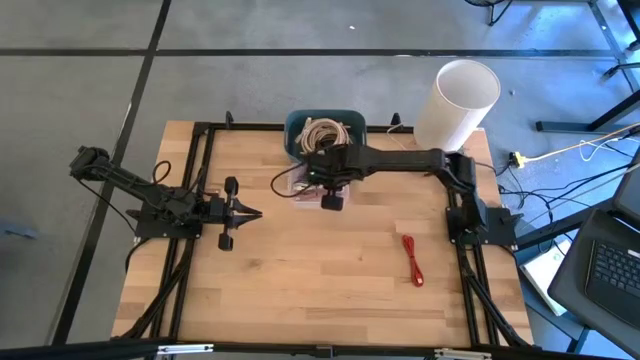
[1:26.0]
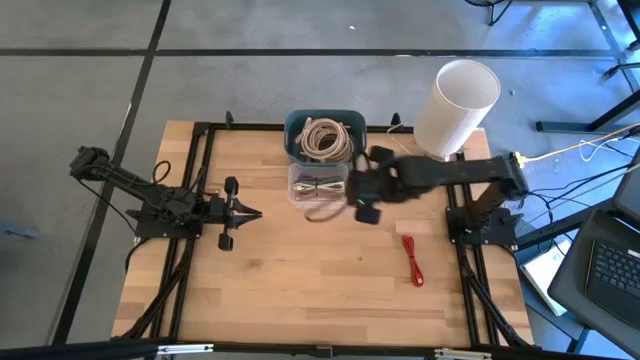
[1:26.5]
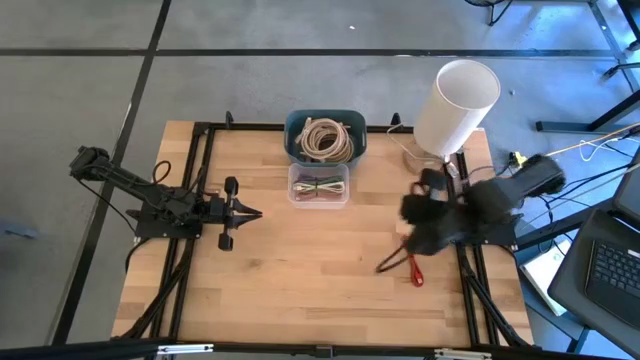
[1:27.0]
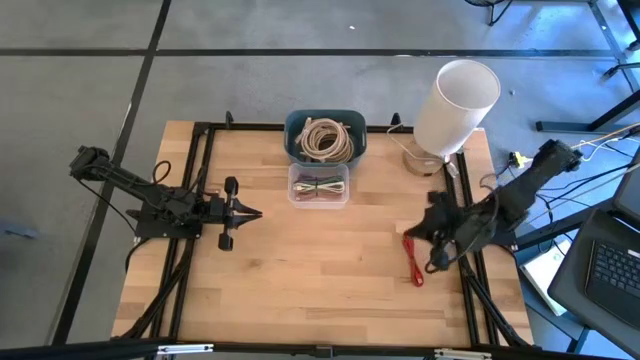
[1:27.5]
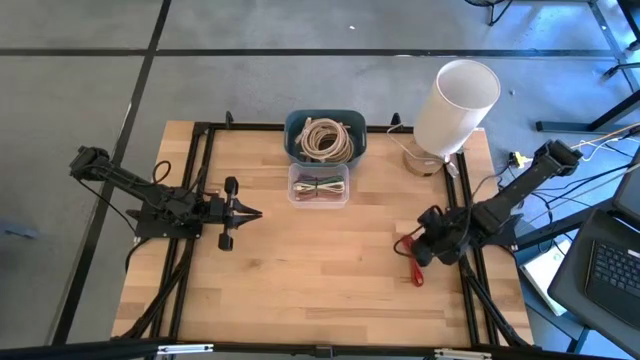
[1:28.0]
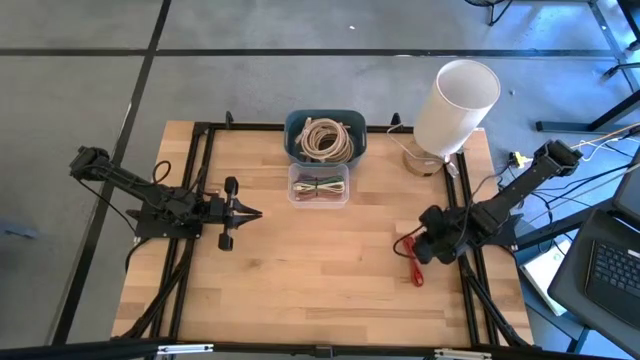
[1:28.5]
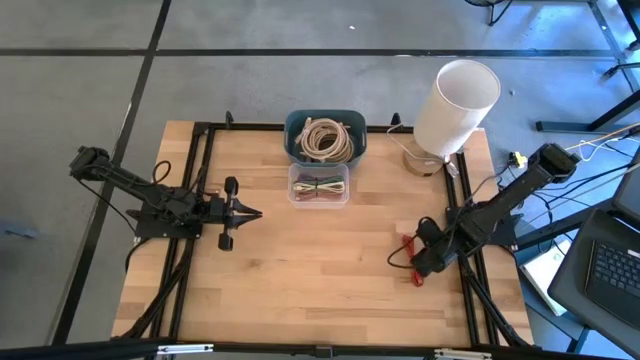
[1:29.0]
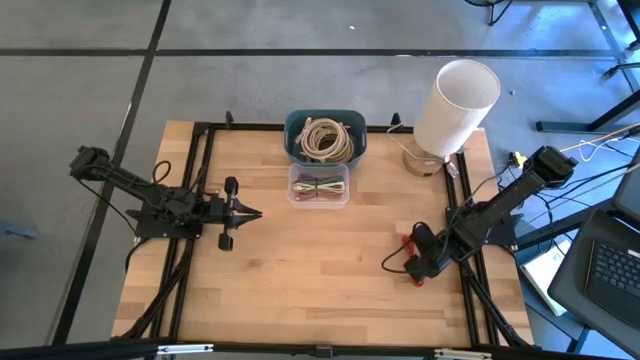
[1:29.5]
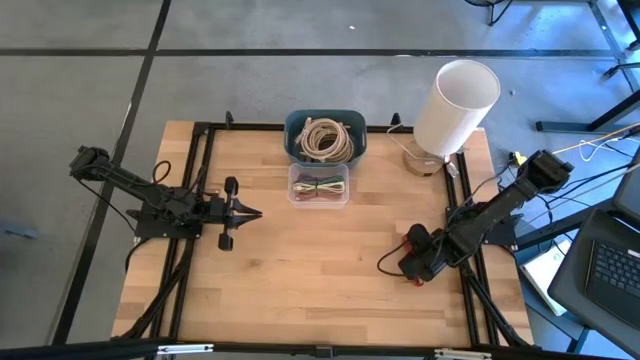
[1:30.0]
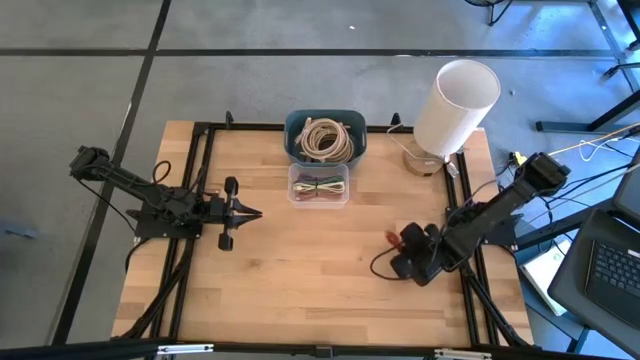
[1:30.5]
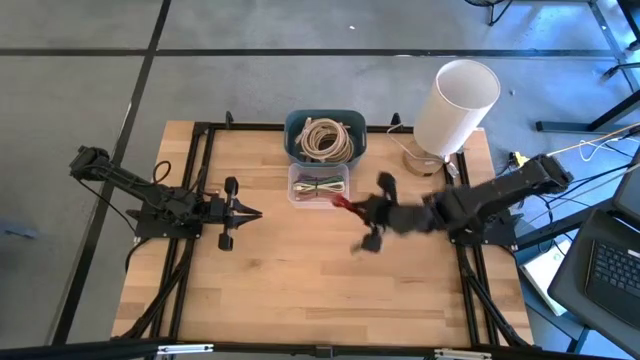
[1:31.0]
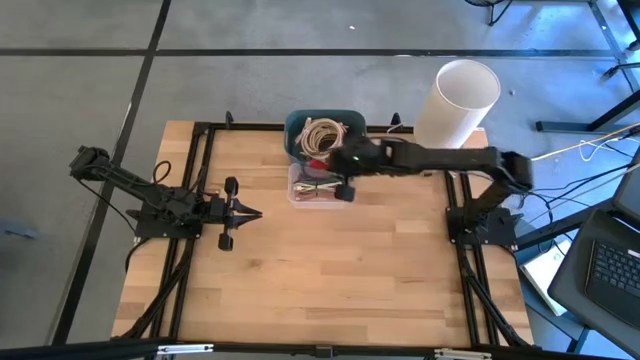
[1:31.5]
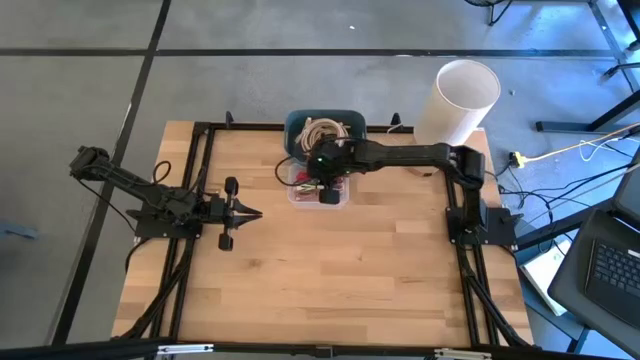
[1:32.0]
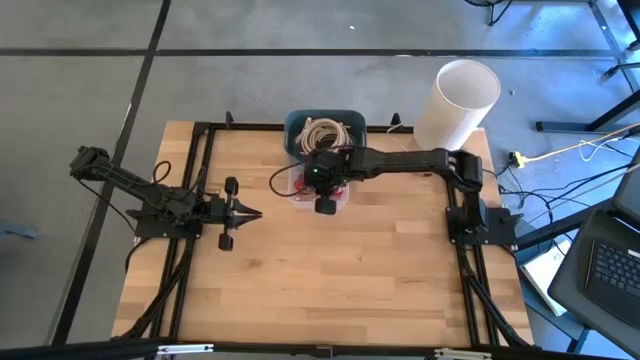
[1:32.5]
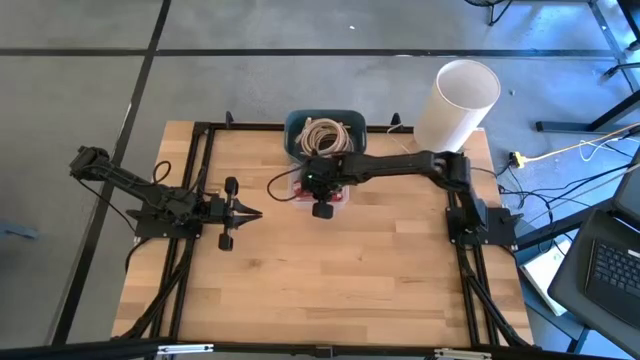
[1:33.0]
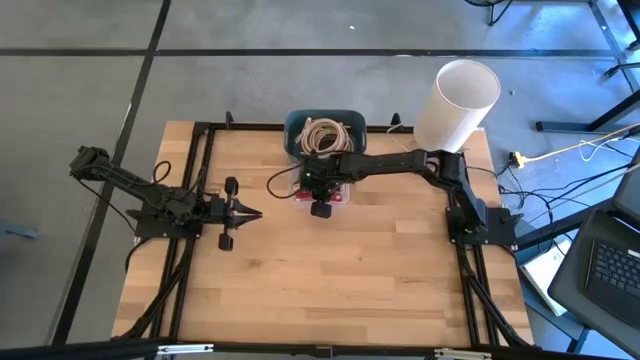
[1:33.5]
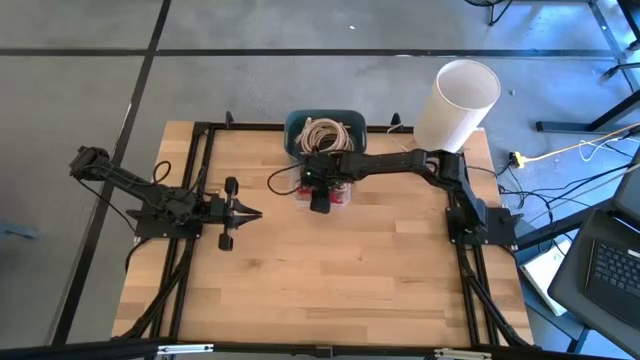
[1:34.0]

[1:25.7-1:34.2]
Put the red charger cable into the transparent bin

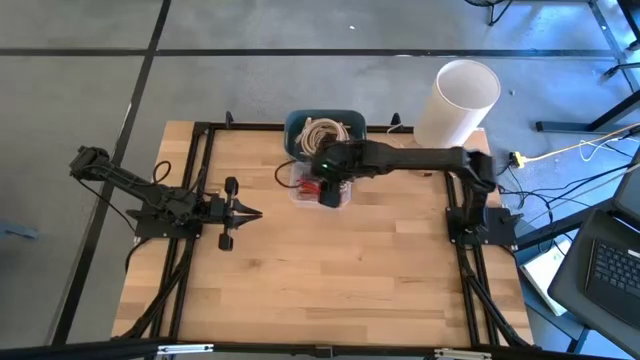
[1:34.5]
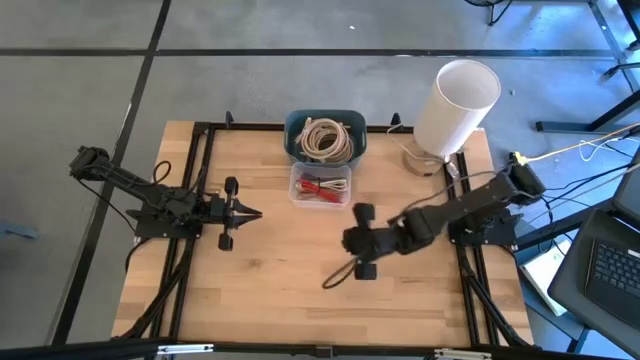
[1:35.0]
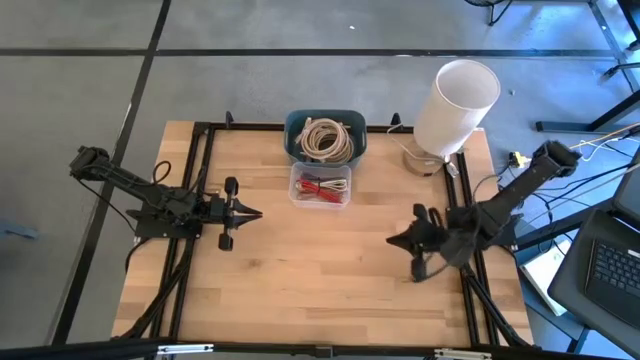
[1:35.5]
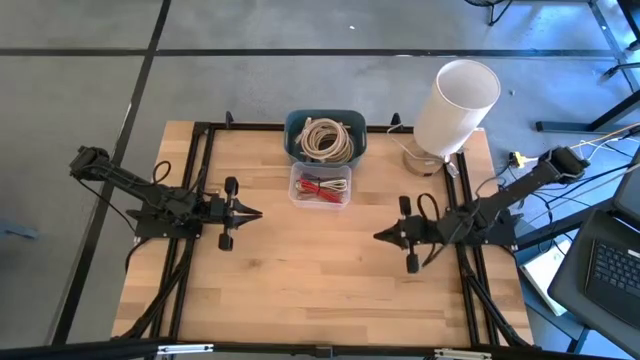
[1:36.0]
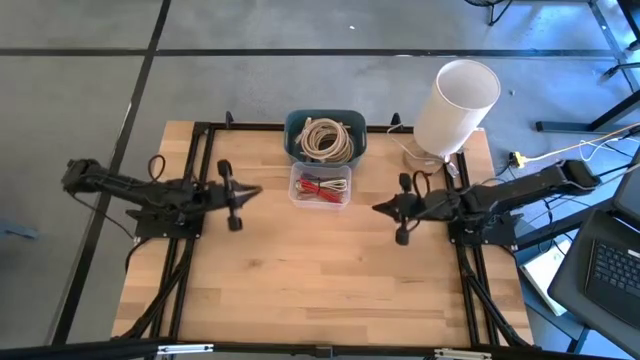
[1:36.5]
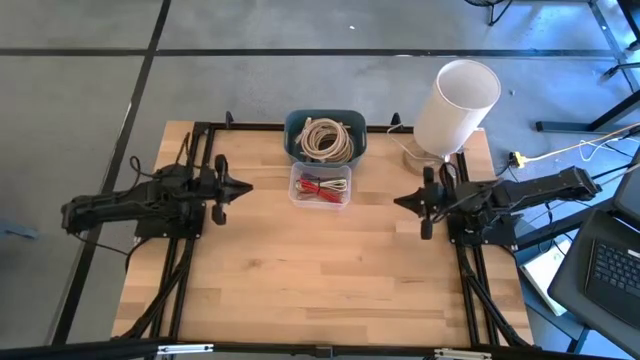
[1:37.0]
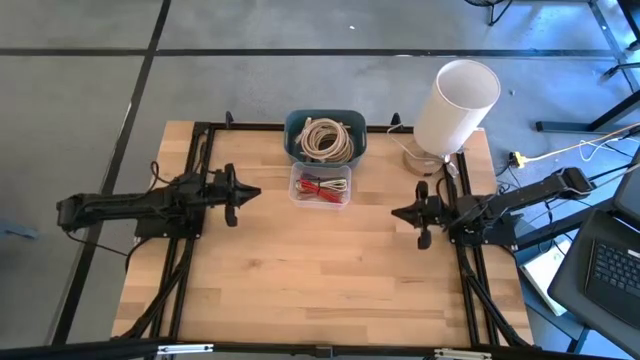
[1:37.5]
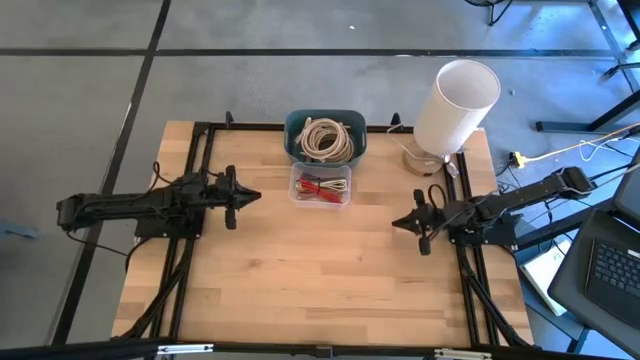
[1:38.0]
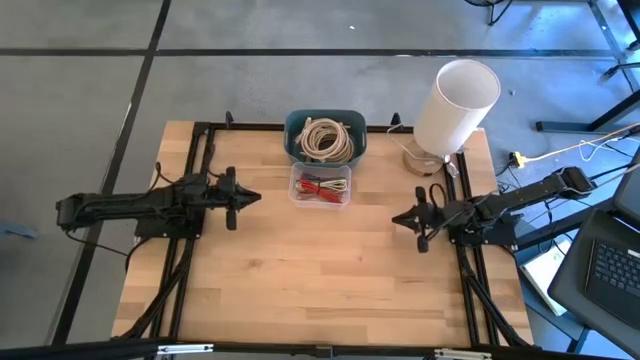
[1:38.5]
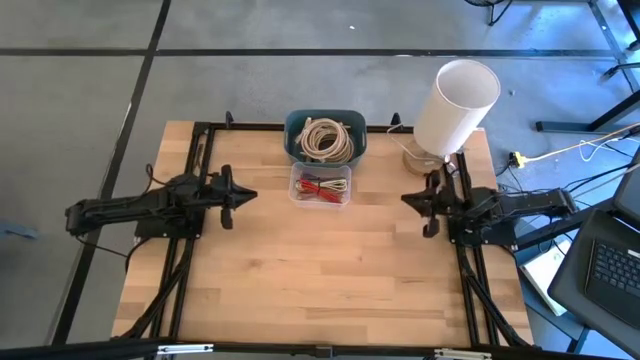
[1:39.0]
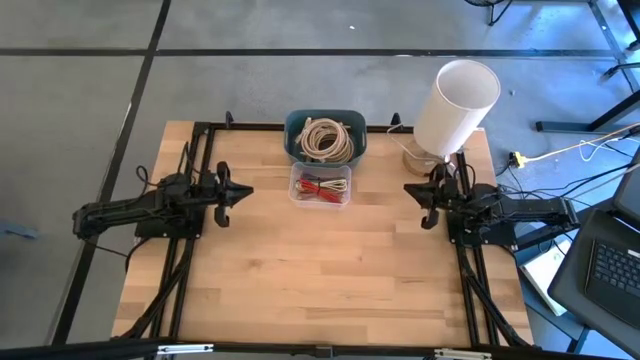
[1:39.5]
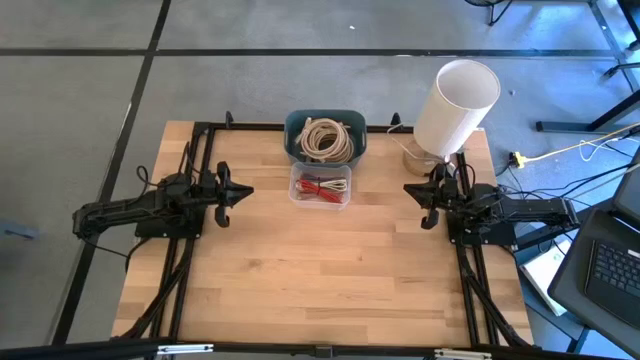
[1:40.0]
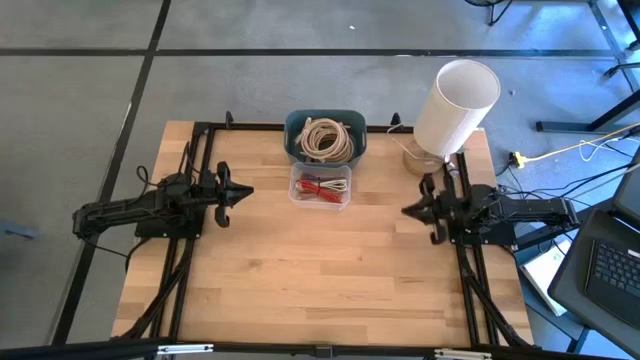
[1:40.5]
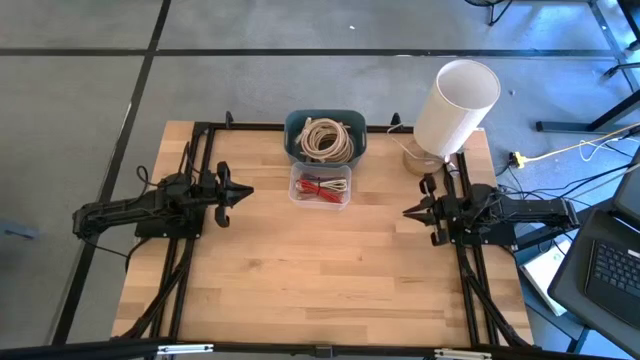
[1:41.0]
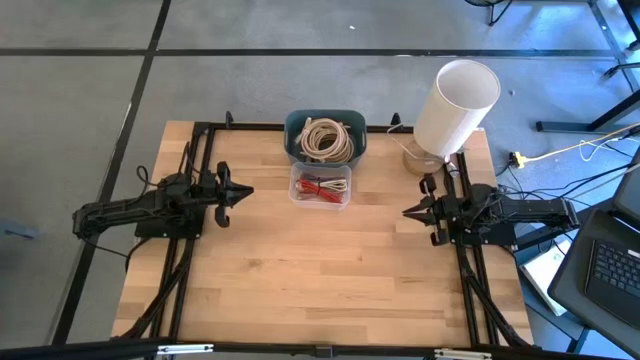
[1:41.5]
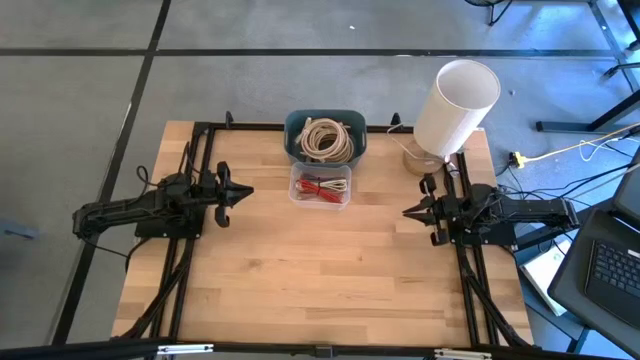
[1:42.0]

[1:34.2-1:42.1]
Return to Home Position
